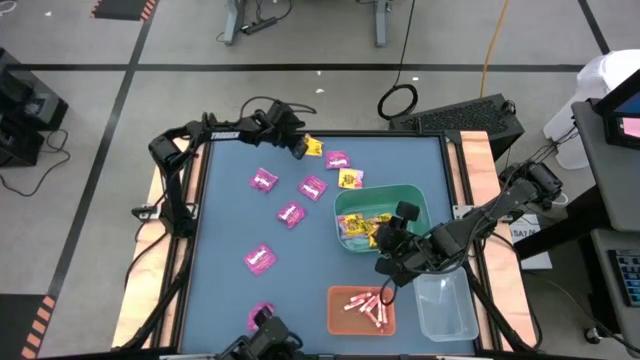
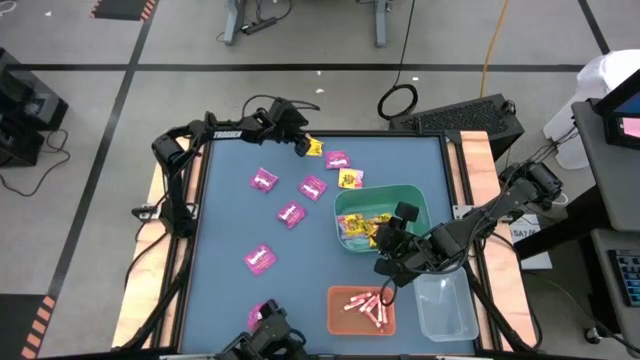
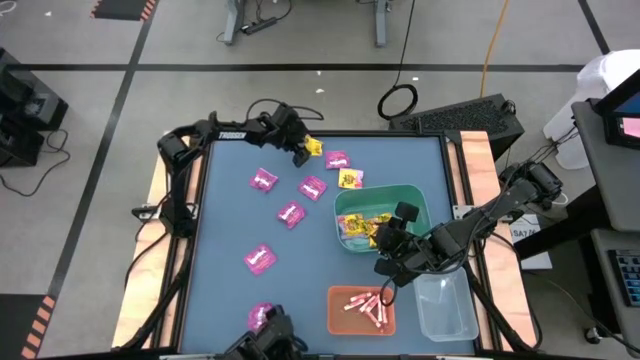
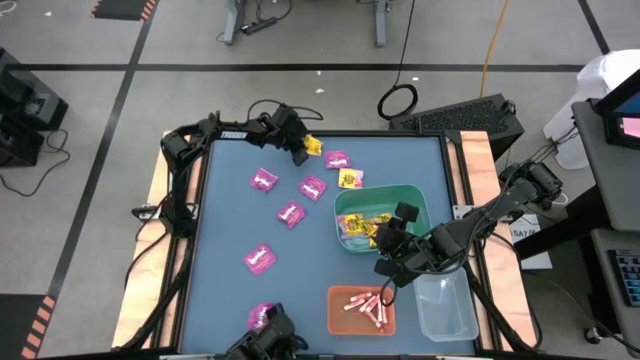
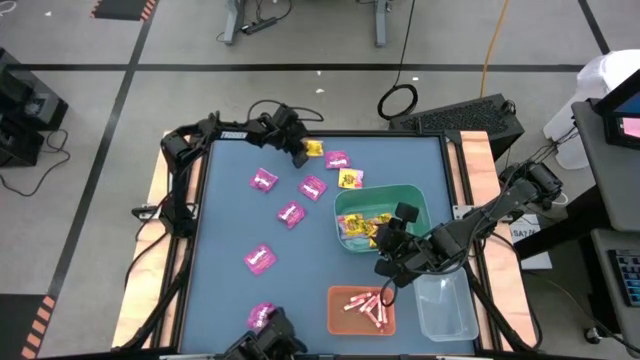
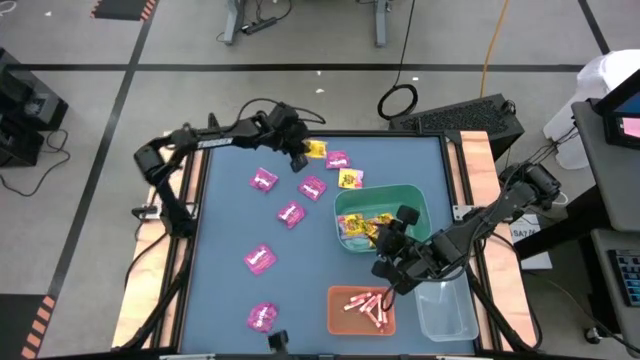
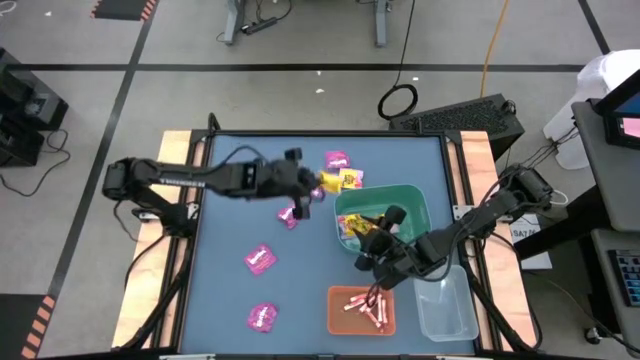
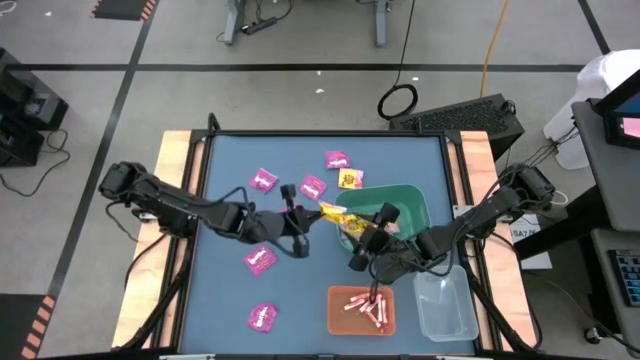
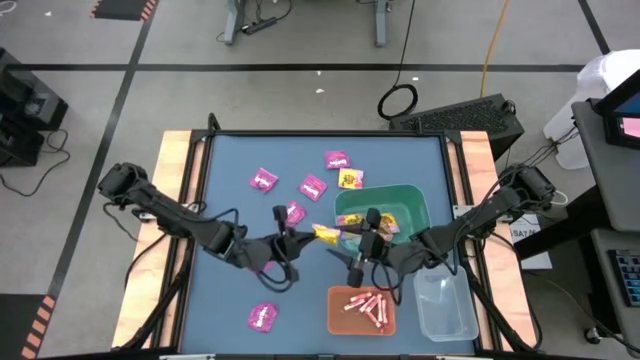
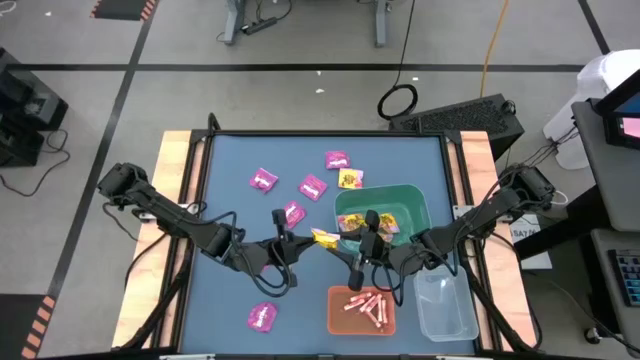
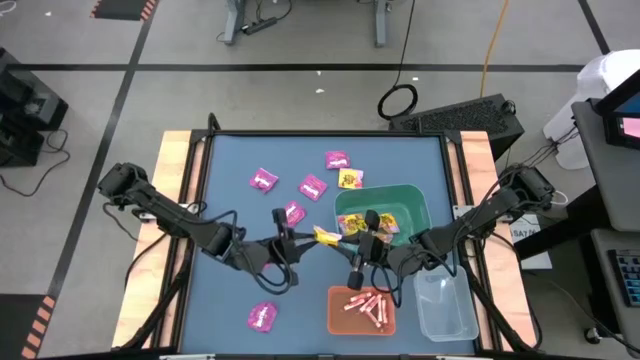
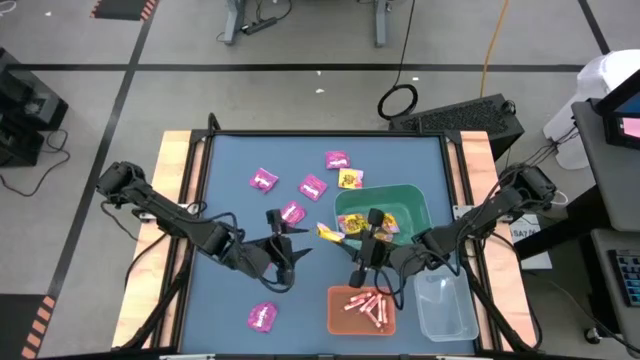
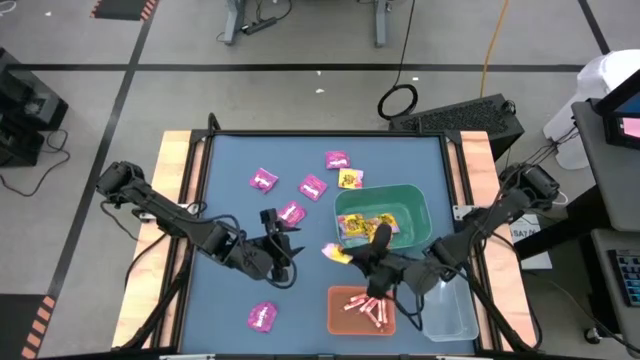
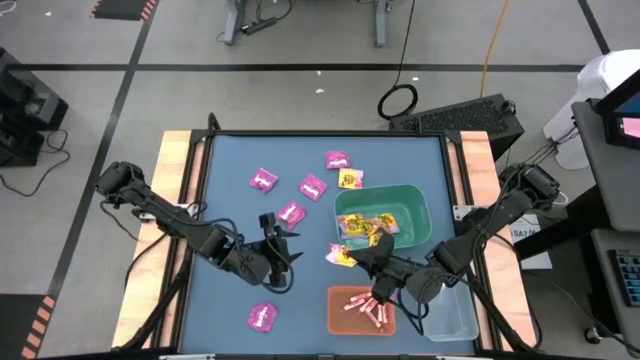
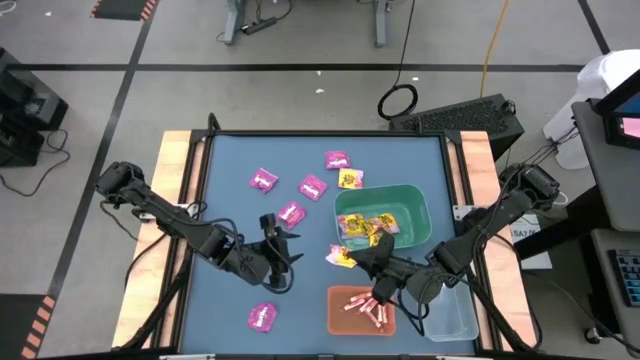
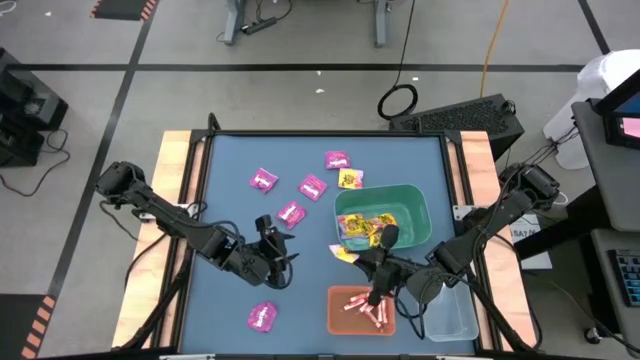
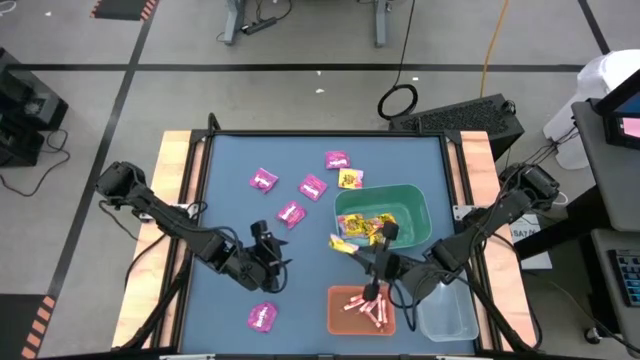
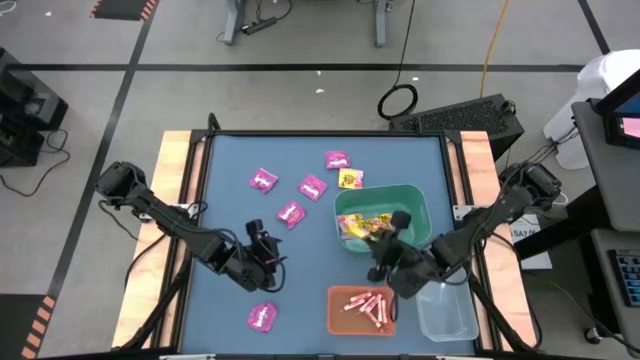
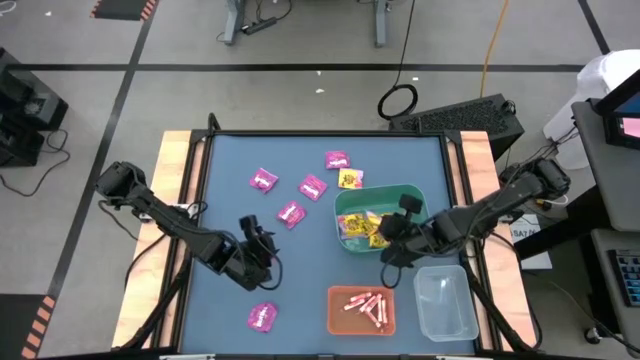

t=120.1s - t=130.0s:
Task: Sort candy
Put the yellow candy pack into the green bin

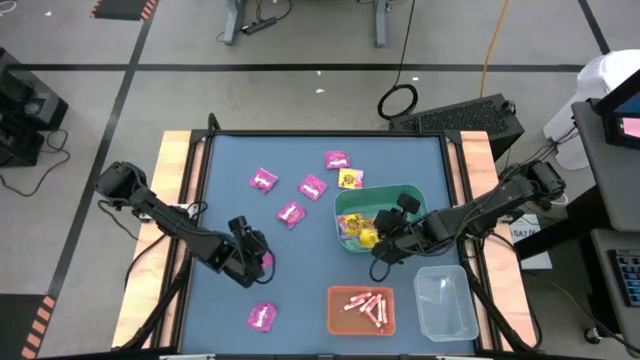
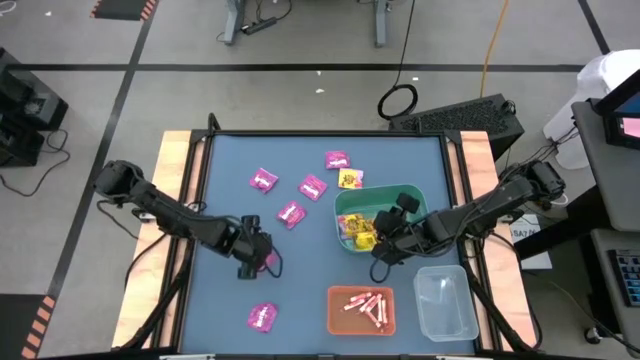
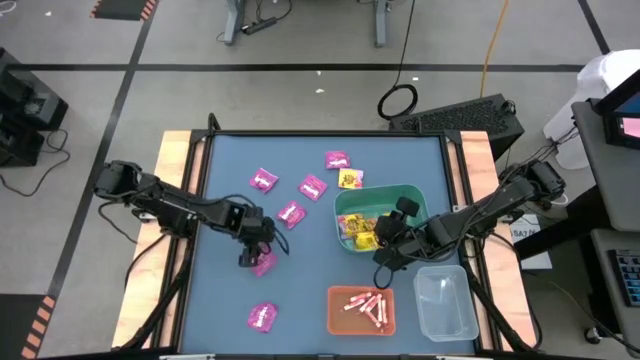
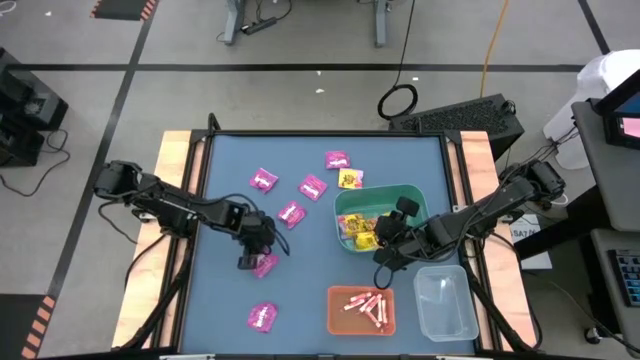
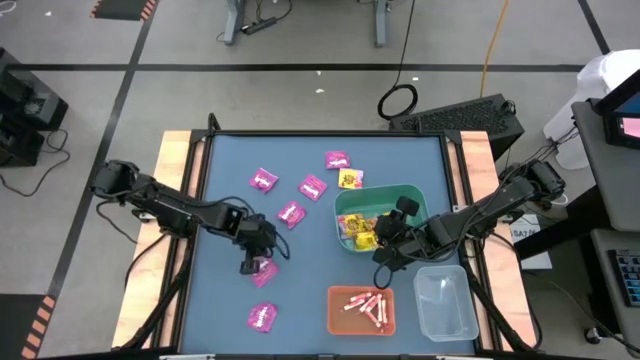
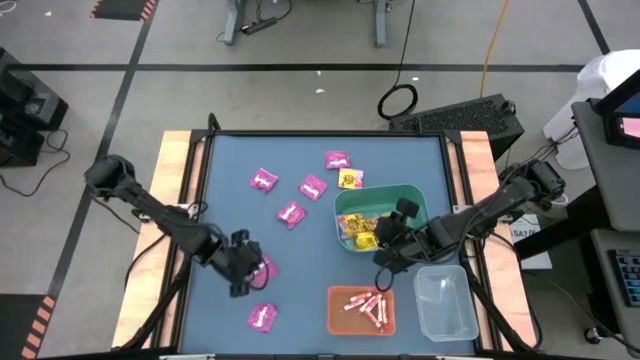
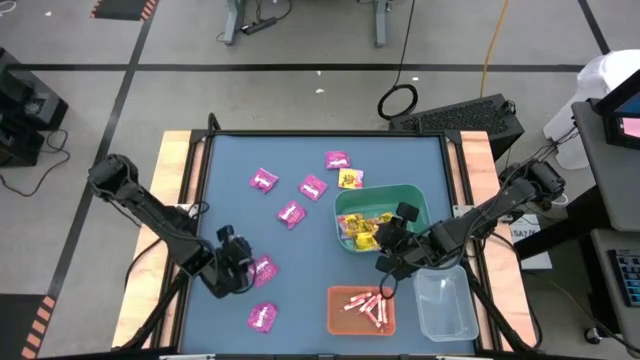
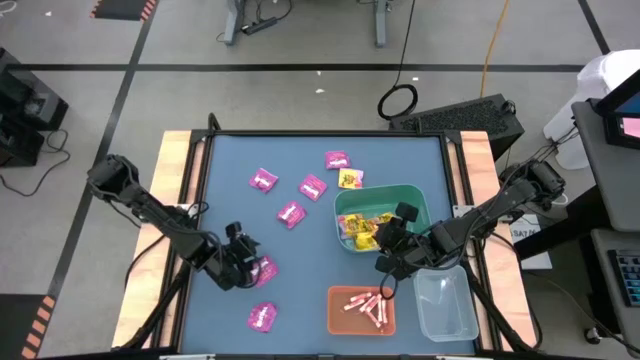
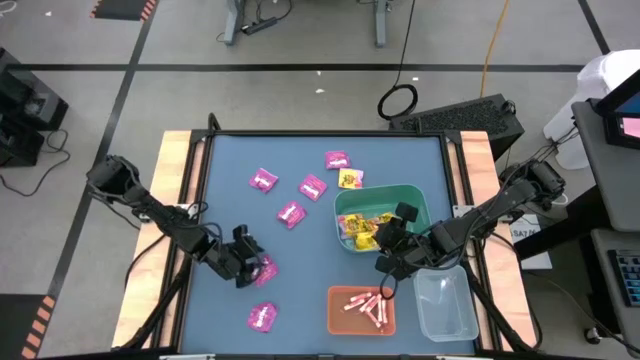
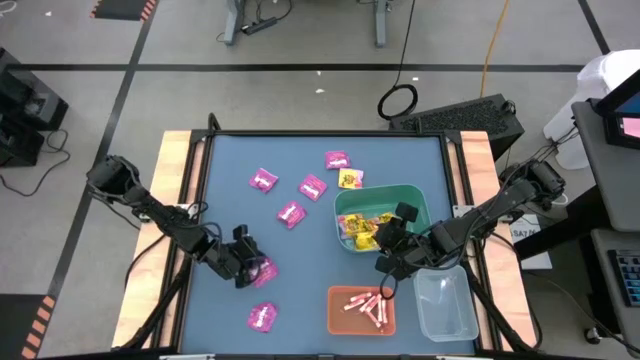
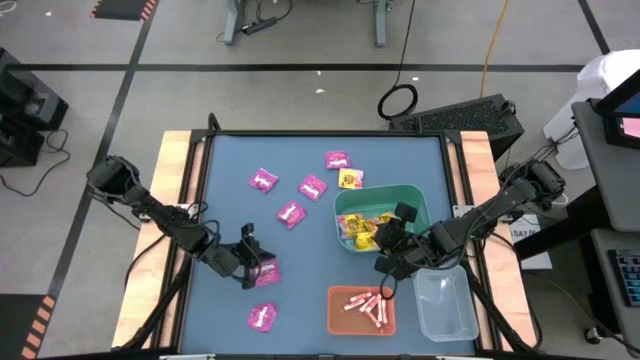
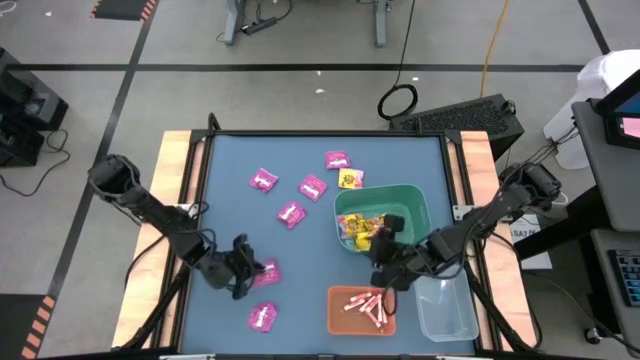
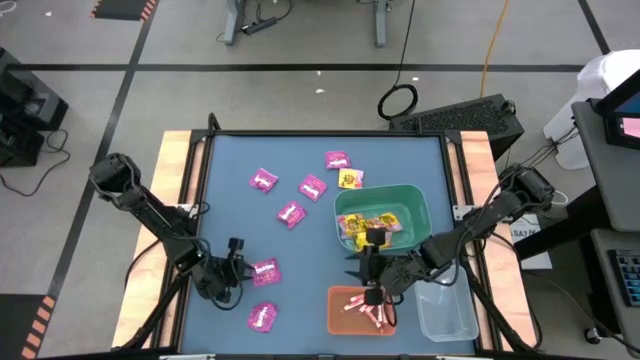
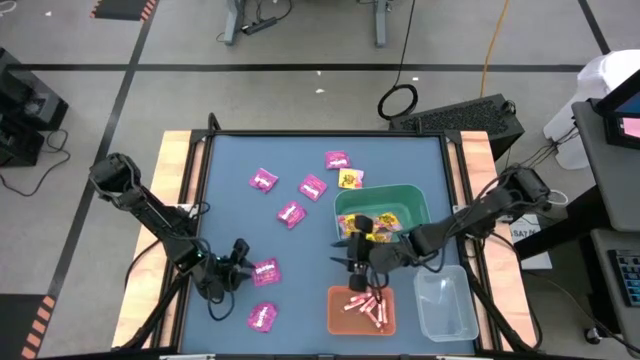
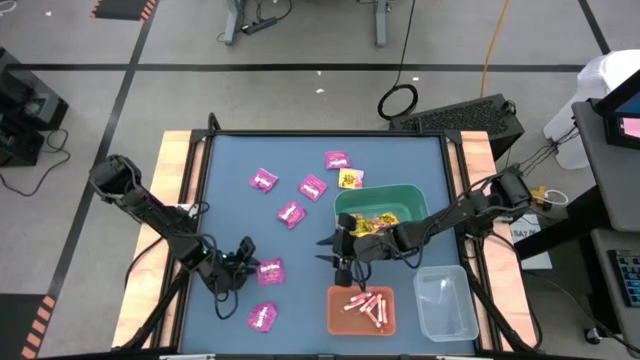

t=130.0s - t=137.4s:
Put the purple candy pack into the transparent bin

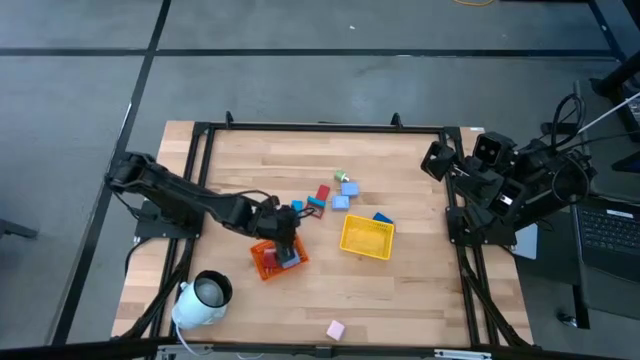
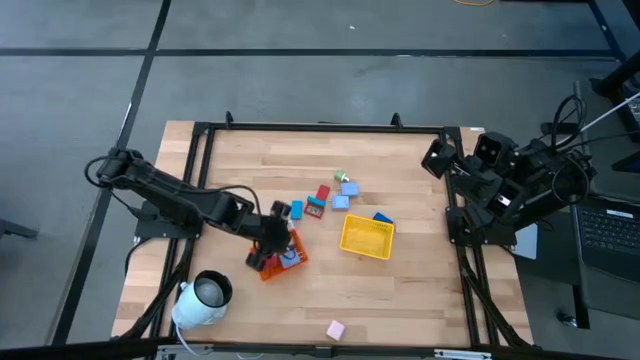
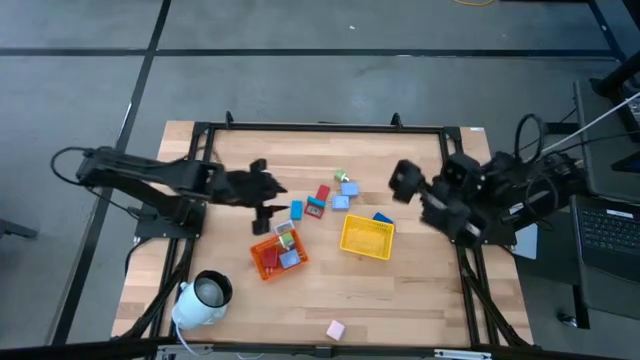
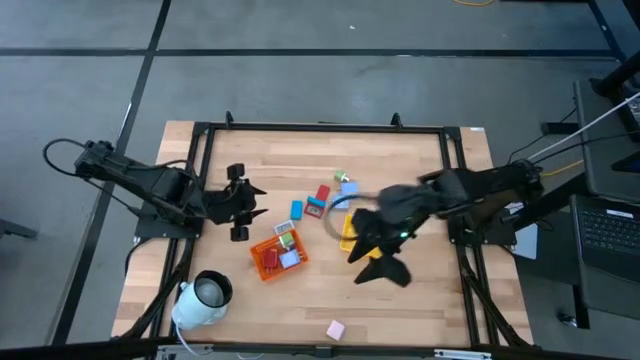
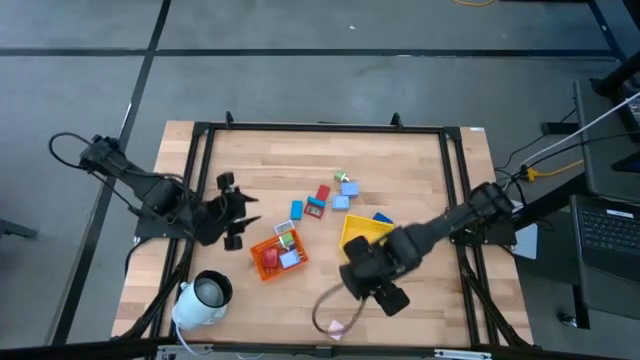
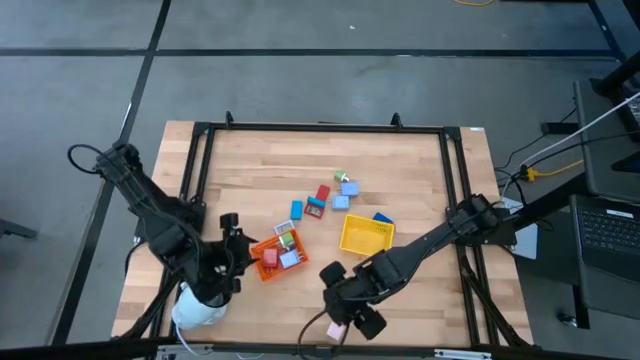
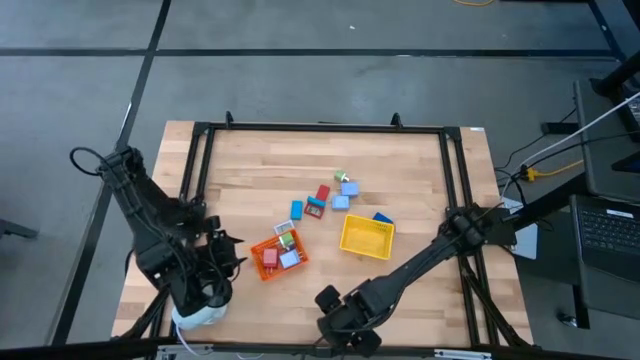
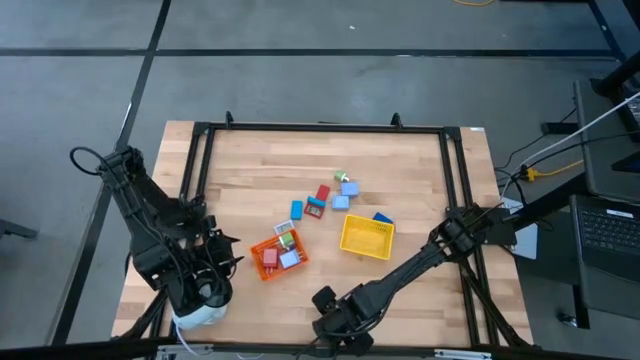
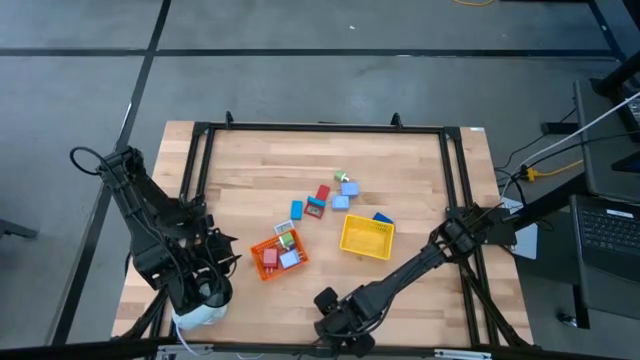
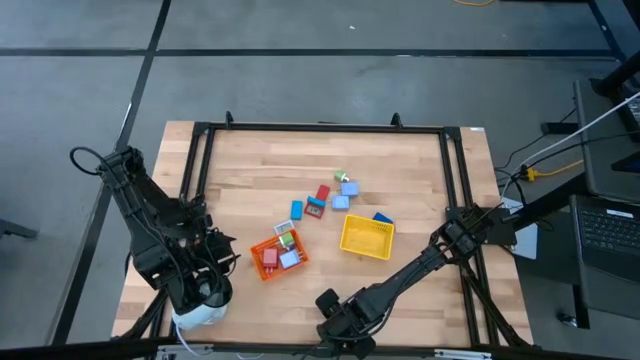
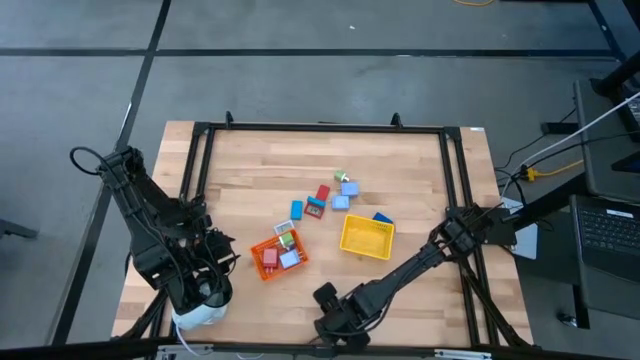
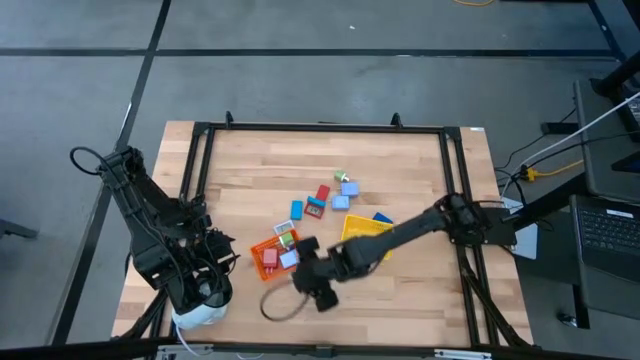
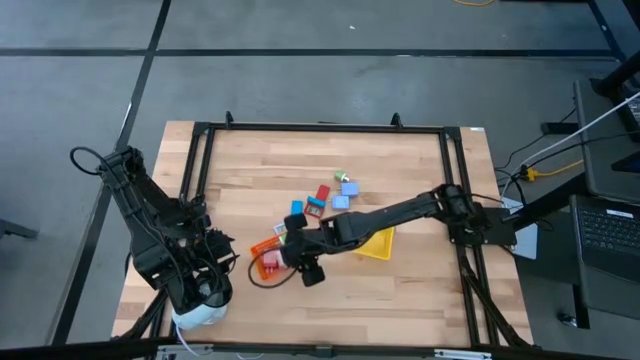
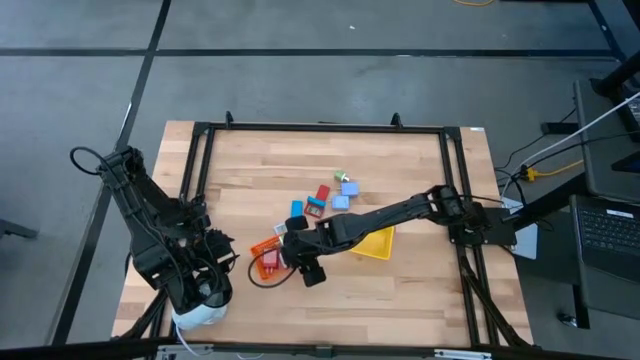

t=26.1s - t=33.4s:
Task: Pick & Place Office items
Put the light pink charger adapter into the orange bin
